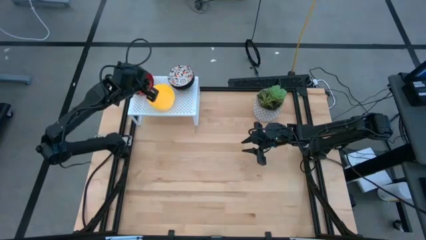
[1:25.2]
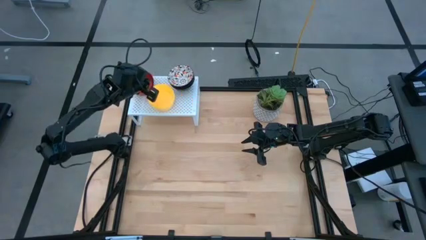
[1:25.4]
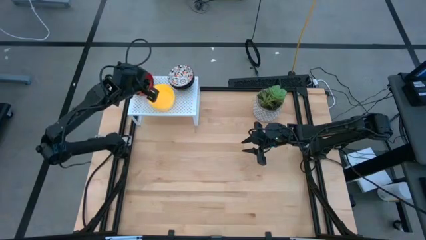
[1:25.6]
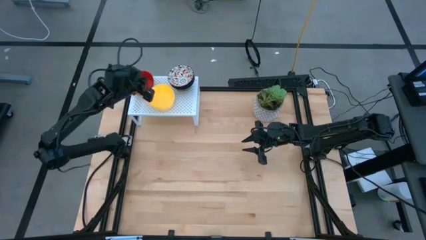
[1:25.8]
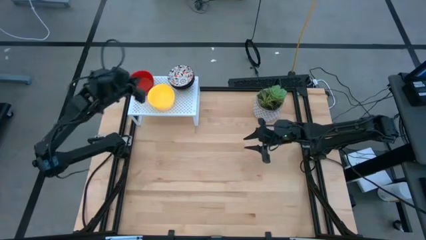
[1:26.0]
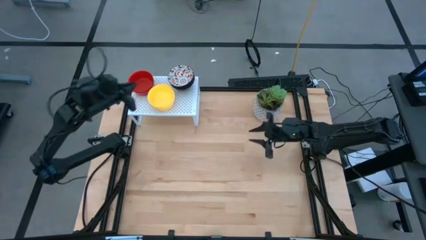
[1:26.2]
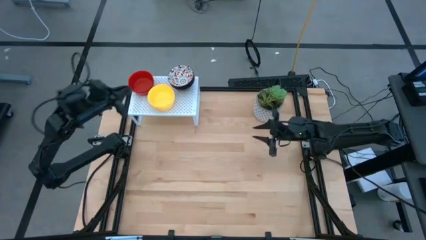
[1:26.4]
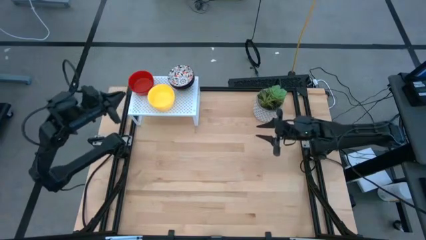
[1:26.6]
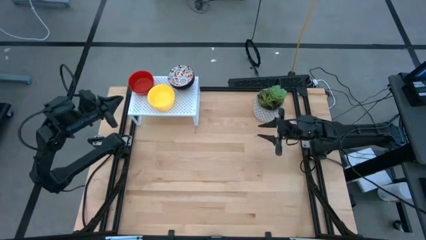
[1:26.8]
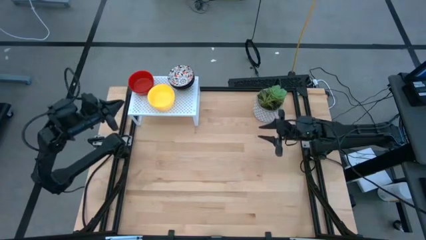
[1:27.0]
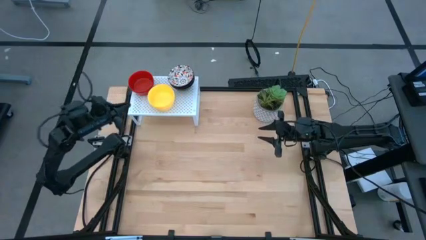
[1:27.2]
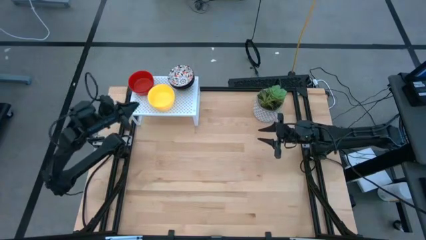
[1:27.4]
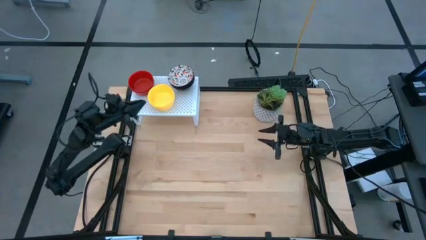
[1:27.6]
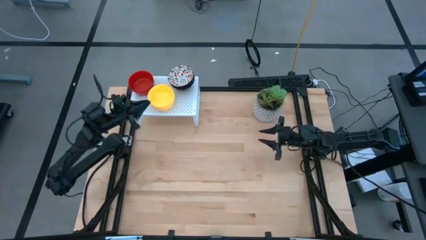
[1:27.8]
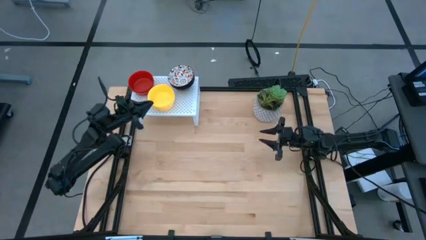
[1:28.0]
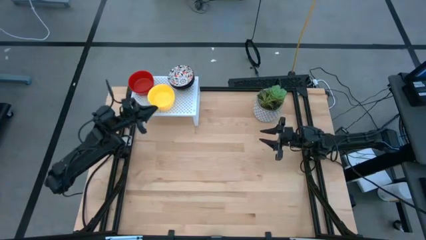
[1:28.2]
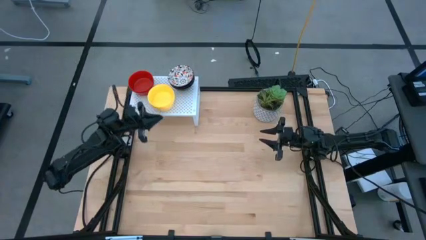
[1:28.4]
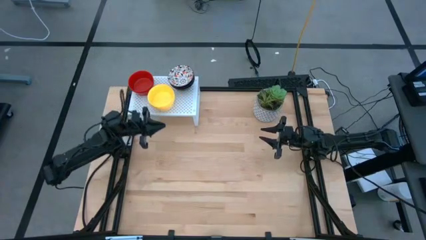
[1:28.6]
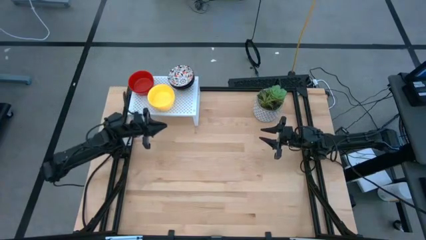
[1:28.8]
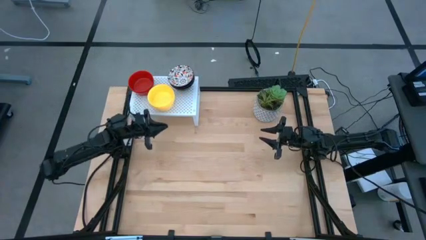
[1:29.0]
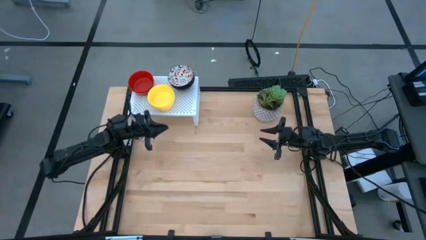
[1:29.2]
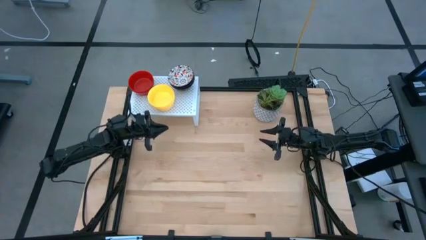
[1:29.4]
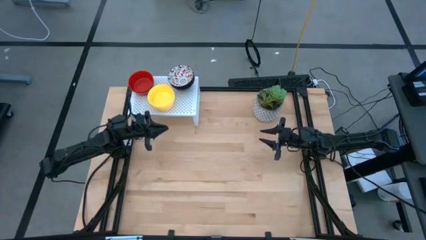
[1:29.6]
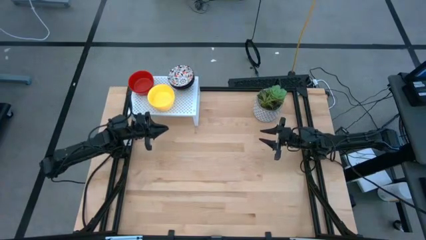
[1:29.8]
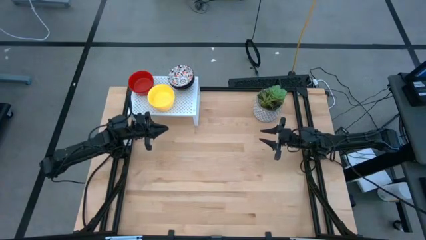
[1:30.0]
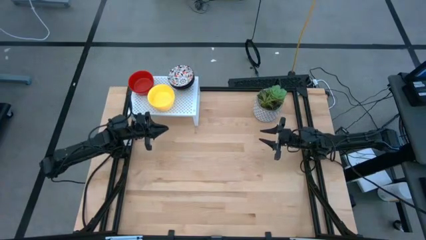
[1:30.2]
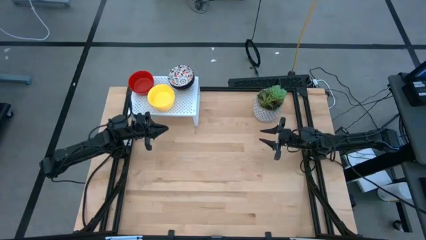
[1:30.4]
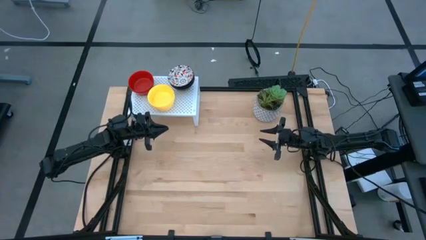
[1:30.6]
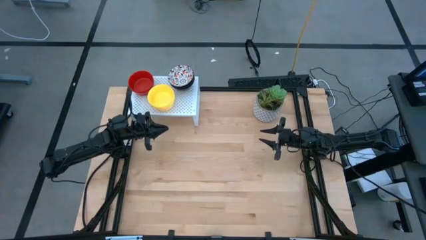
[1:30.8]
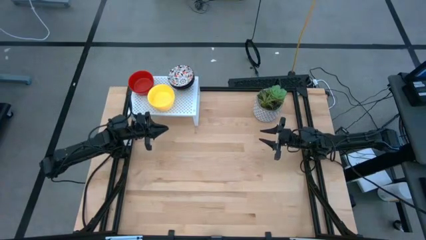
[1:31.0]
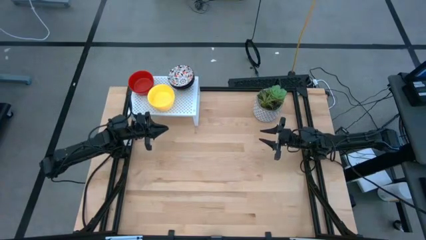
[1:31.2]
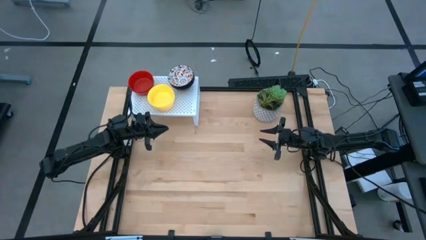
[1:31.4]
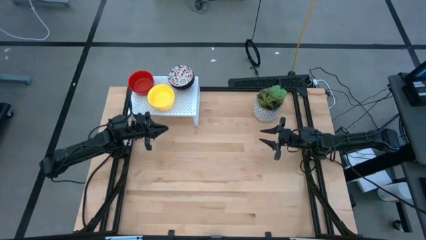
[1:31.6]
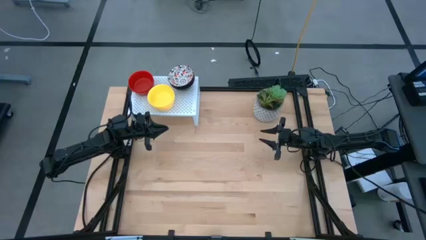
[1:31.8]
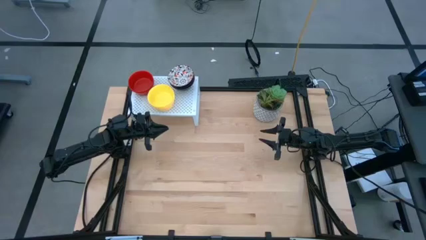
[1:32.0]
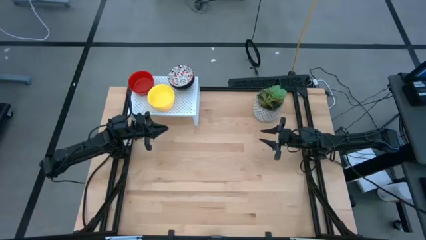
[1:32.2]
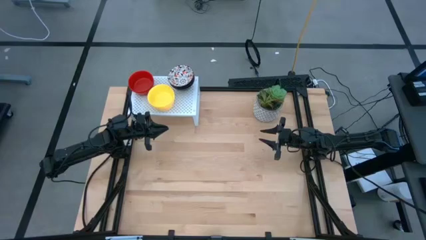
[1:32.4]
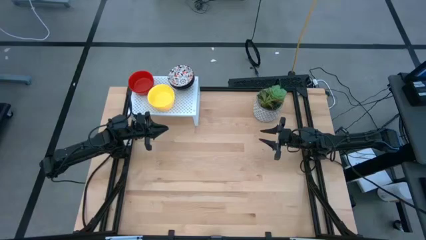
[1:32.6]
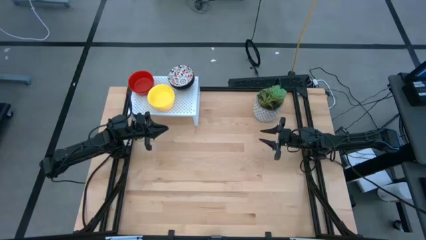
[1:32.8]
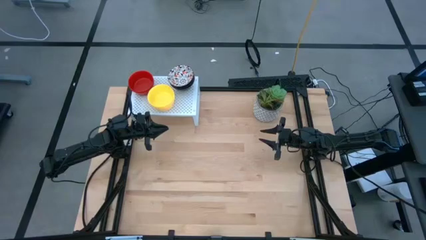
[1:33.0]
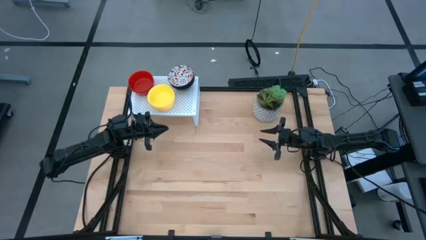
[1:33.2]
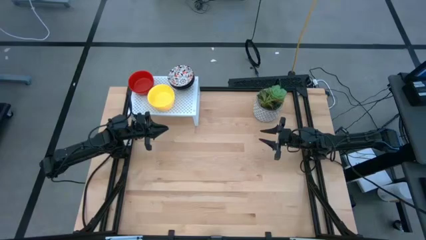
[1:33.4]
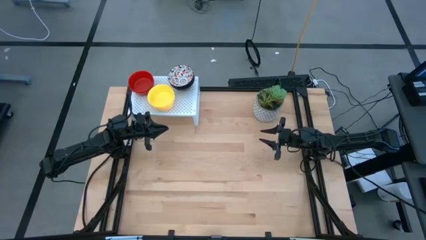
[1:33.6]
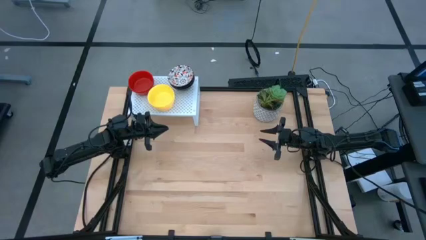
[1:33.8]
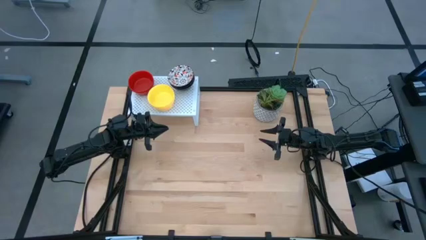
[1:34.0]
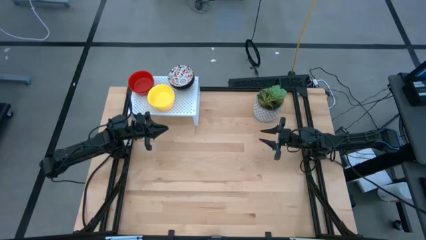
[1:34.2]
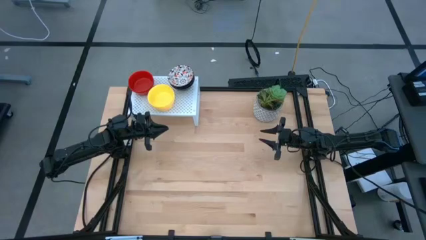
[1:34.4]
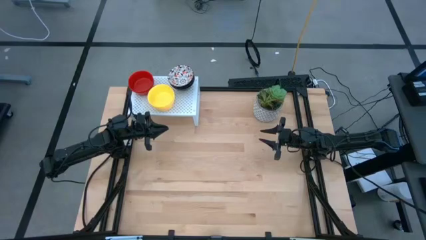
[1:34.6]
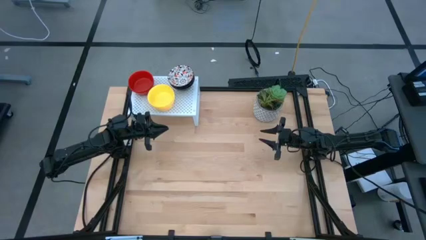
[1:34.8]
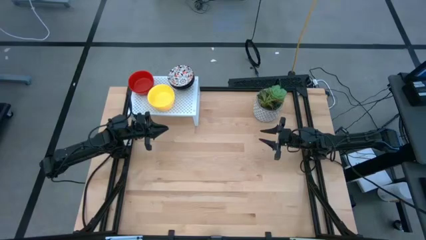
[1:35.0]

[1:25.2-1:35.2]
Task: Pick & Place Mini bowls
Return to Home Position

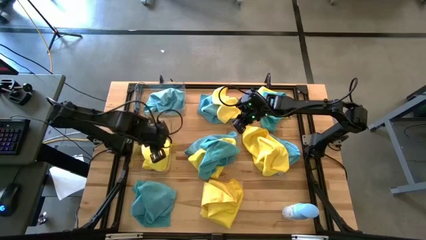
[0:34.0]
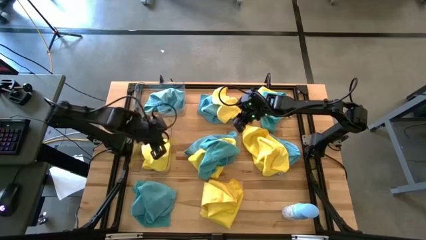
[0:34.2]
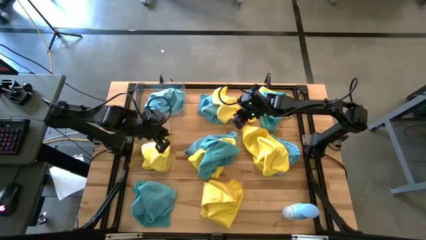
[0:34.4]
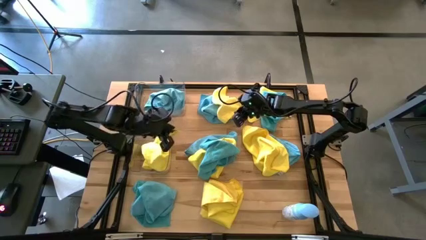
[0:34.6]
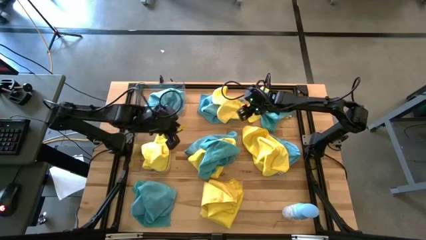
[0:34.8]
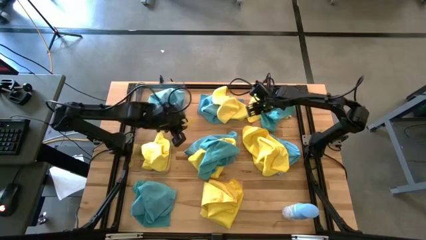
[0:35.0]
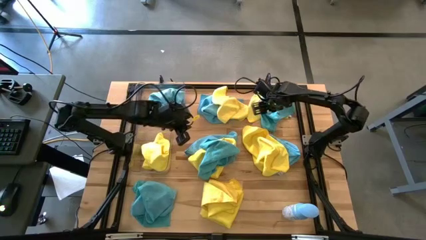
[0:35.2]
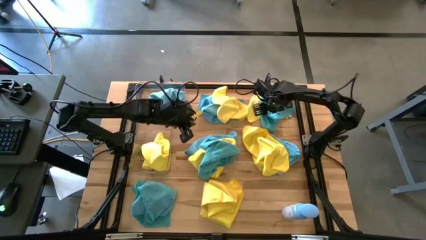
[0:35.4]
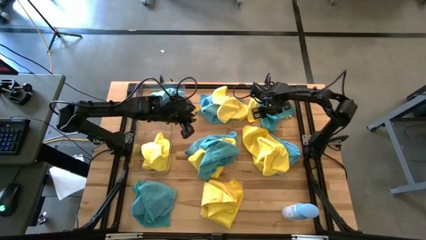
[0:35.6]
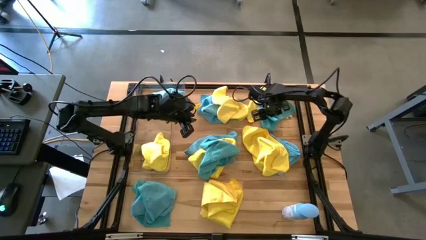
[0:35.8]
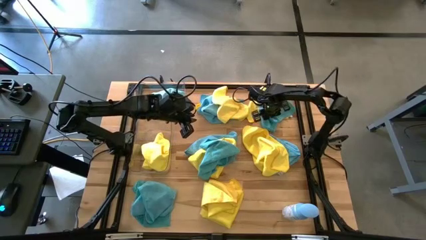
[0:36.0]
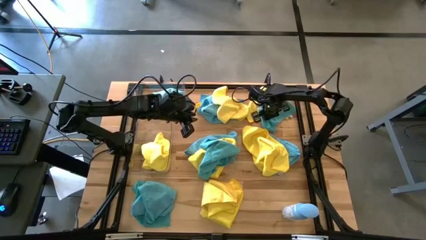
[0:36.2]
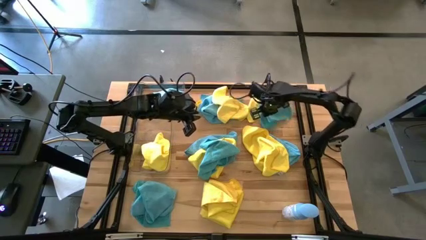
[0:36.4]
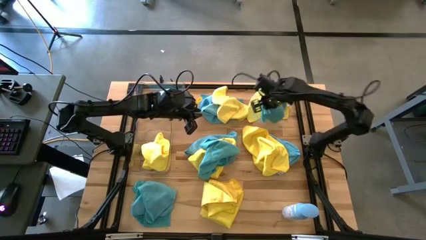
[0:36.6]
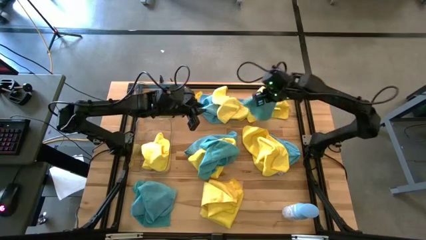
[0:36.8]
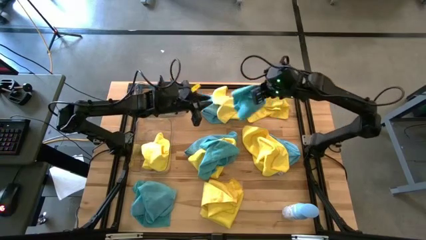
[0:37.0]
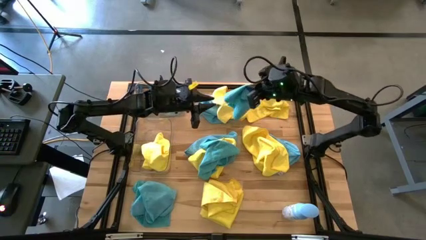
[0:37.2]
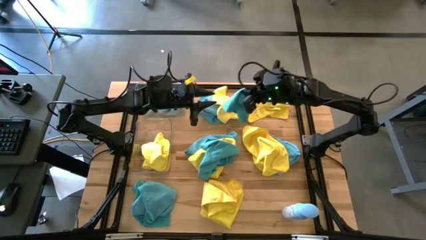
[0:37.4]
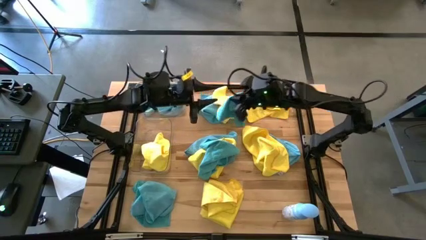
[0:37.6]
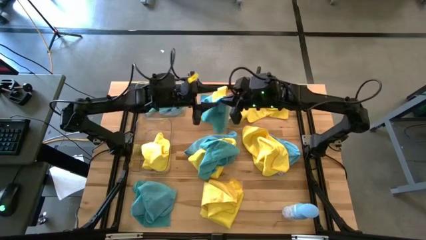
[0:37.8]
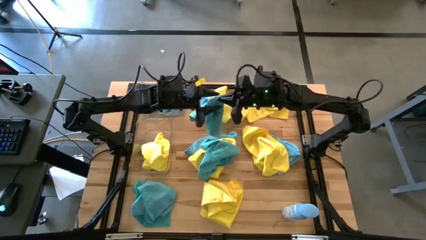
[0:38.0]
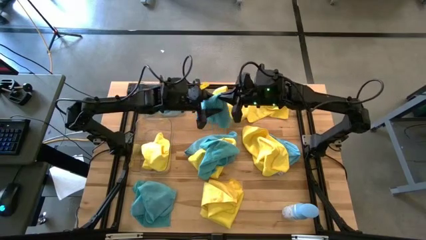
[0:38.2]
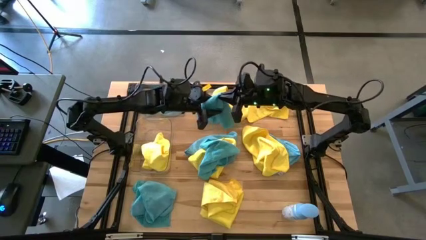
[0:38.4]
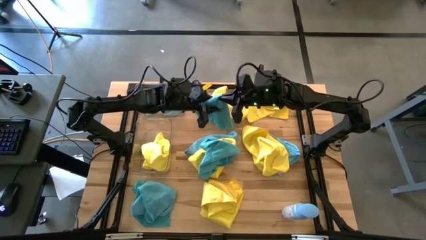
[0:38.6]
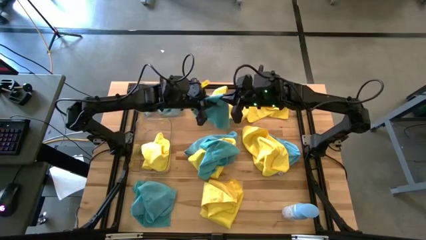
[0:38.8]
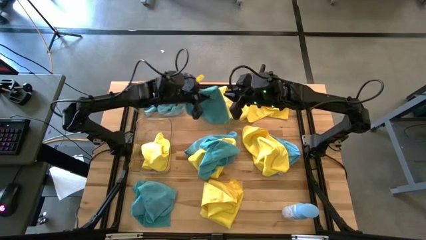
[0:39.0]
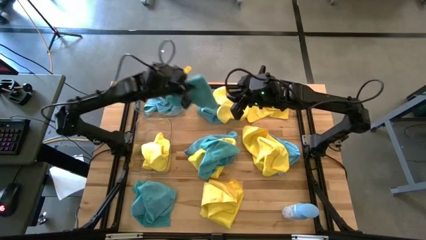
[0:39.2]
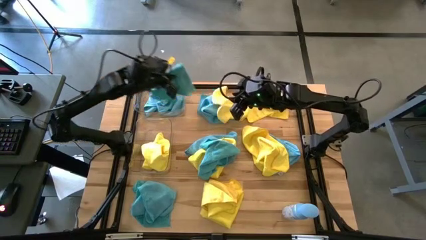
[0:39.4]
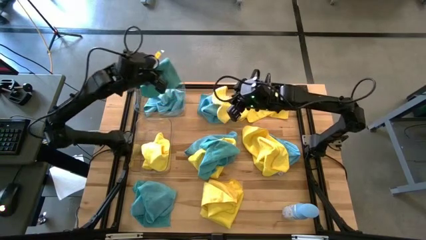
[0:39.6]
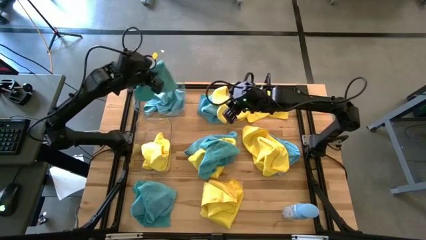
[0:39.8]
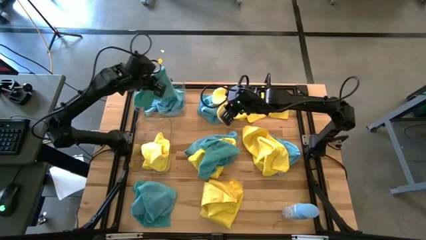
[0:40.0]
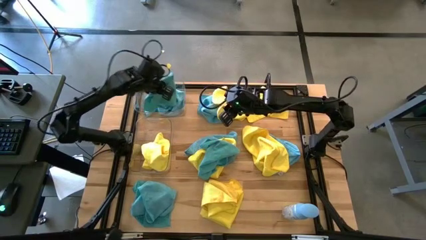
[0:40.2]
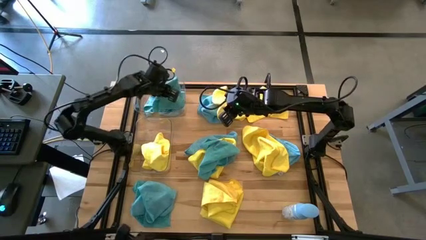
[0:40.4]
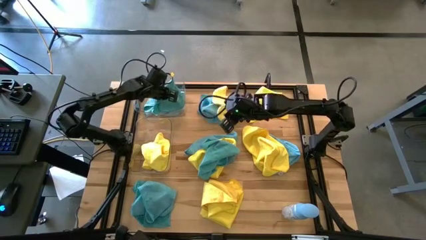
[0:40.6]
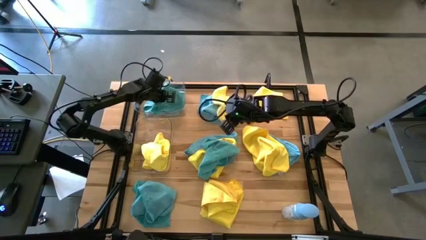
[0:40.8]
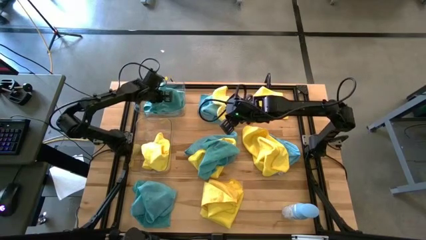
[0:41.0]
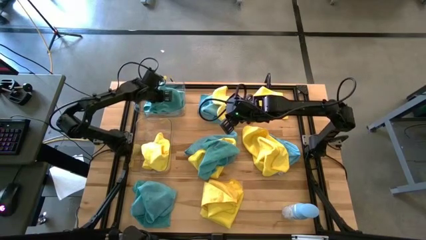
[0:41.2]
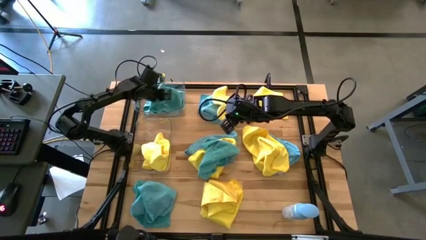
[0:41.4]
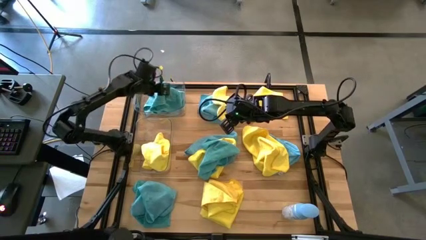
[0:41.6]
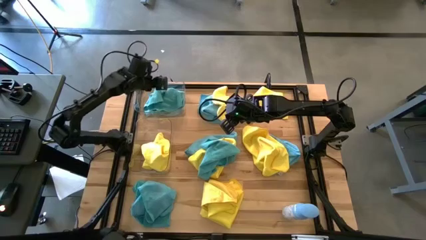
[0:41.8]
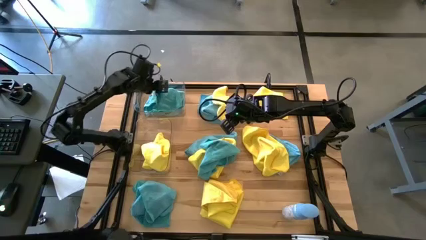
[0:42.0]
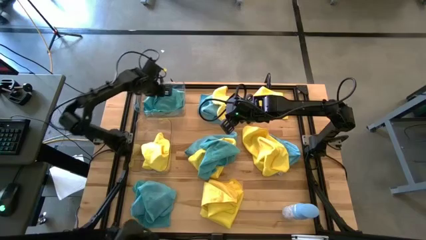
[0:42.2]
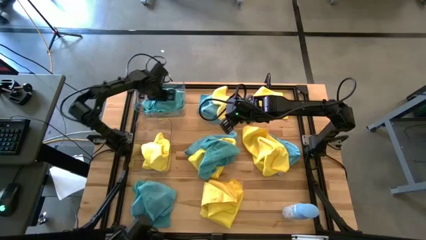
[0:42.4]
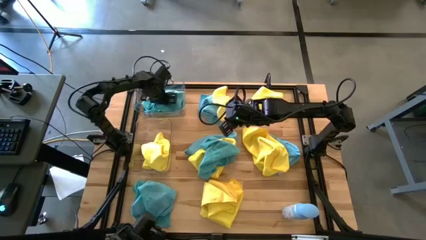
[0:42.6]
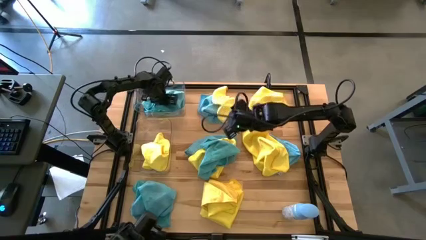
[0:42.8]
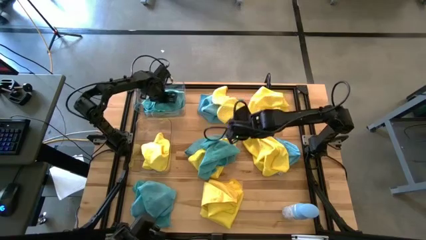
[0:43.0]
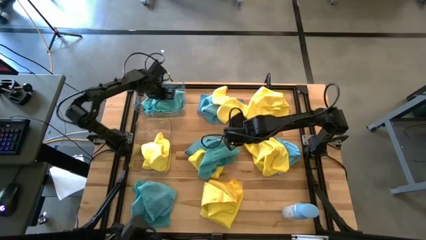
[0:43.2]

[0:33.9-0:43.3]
Task: Sort microfiber towel by color & place in baskets
Put the blue microfiber cloth into the top transparent bin
